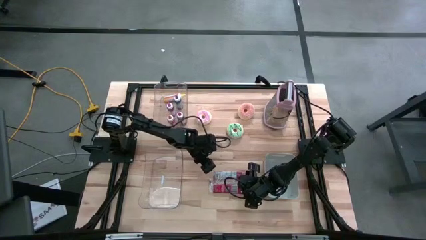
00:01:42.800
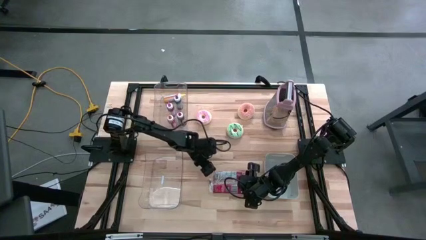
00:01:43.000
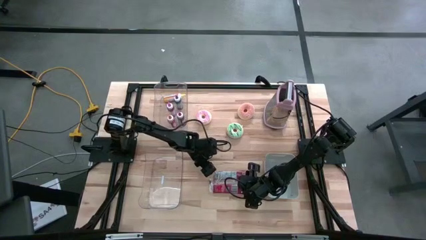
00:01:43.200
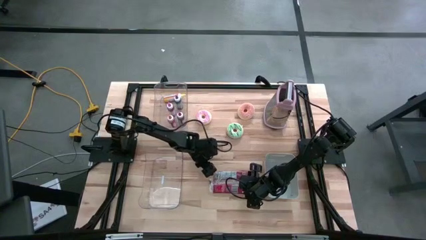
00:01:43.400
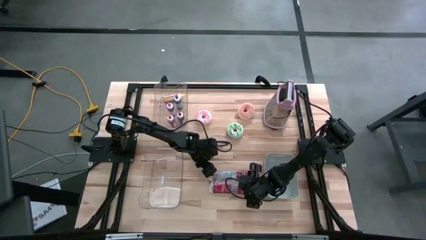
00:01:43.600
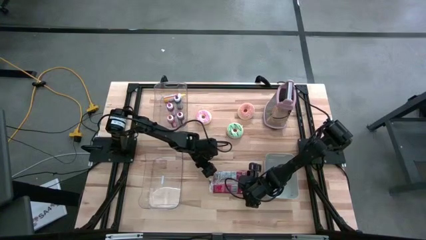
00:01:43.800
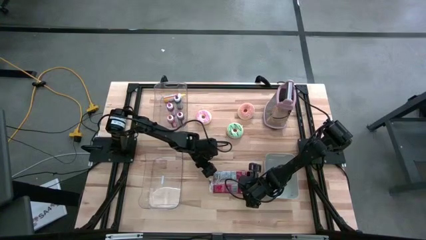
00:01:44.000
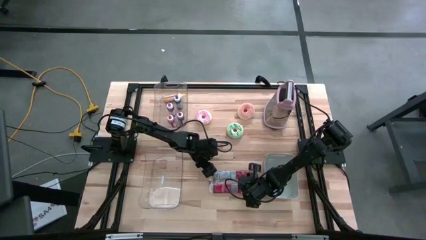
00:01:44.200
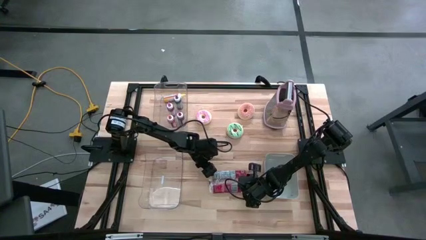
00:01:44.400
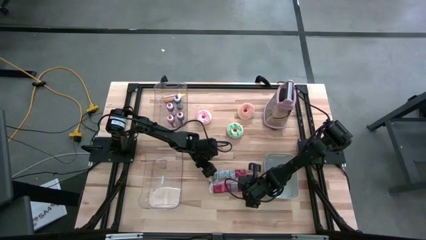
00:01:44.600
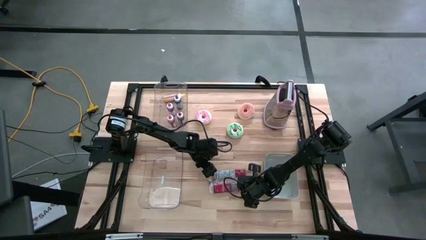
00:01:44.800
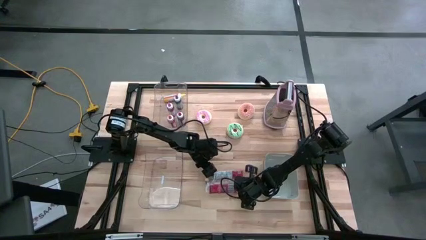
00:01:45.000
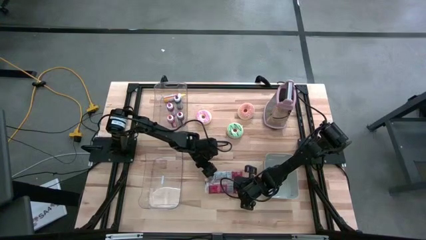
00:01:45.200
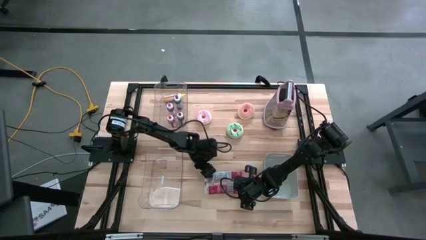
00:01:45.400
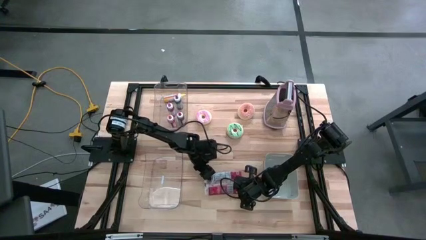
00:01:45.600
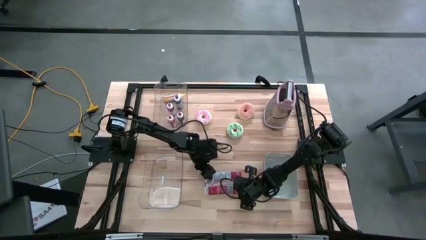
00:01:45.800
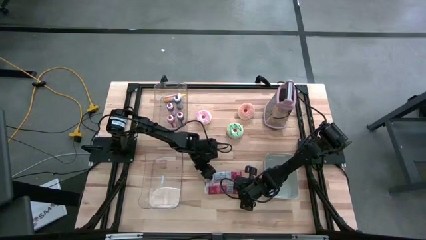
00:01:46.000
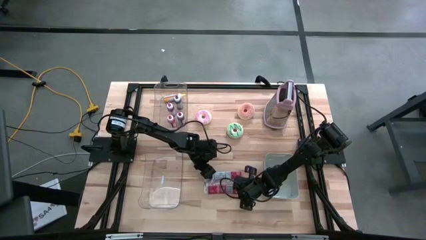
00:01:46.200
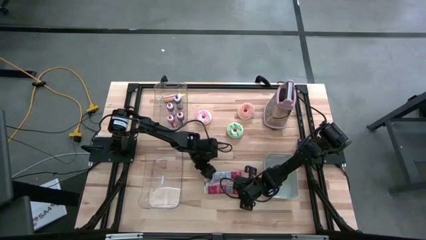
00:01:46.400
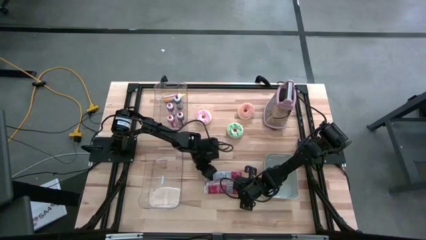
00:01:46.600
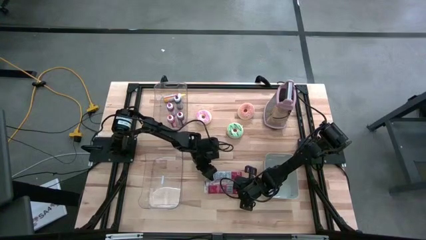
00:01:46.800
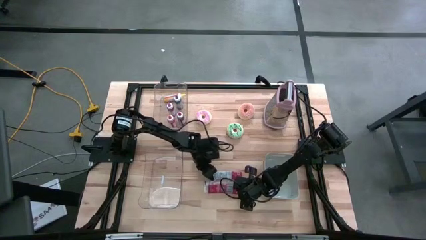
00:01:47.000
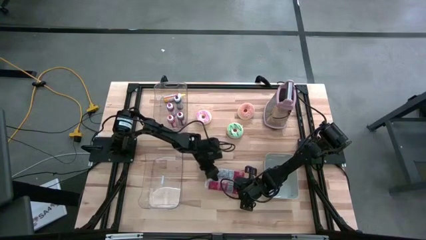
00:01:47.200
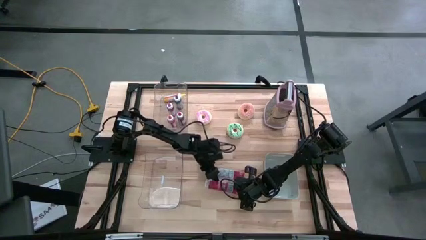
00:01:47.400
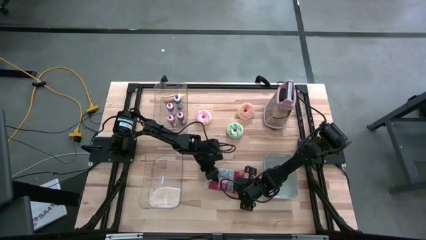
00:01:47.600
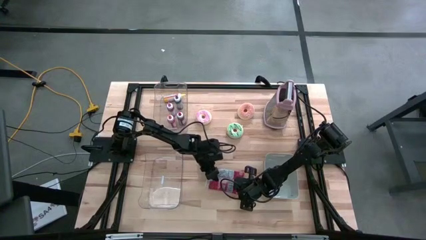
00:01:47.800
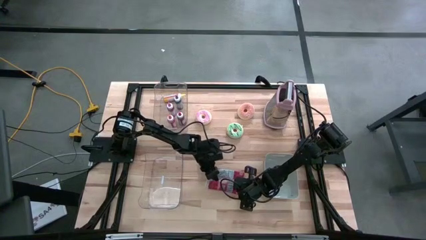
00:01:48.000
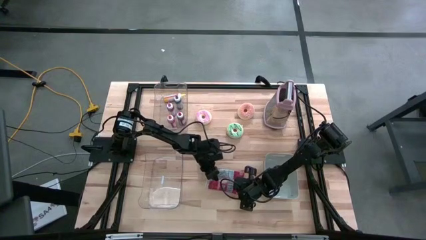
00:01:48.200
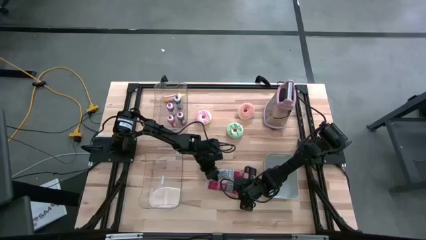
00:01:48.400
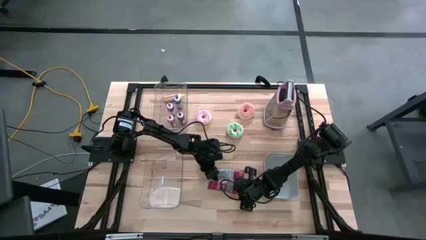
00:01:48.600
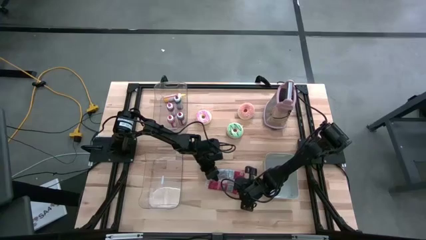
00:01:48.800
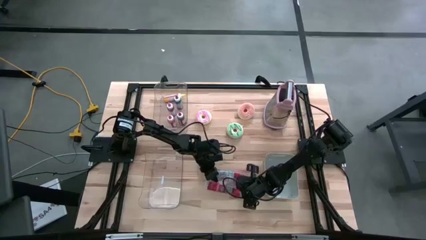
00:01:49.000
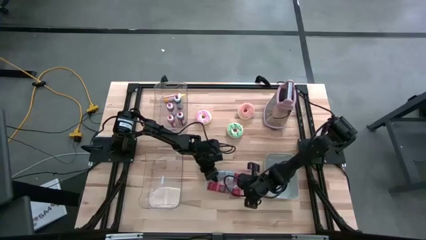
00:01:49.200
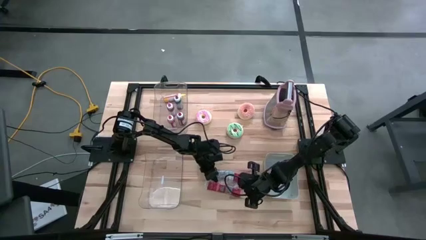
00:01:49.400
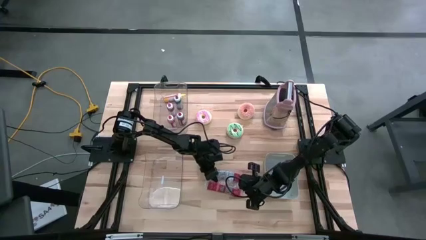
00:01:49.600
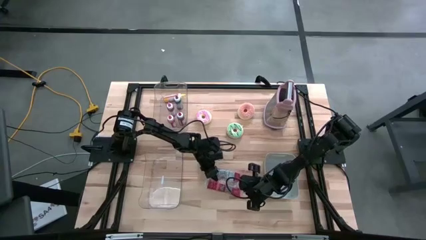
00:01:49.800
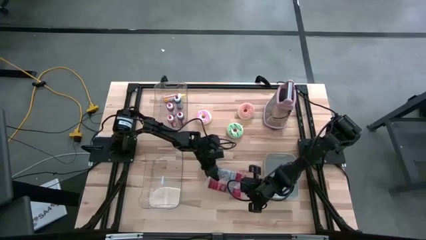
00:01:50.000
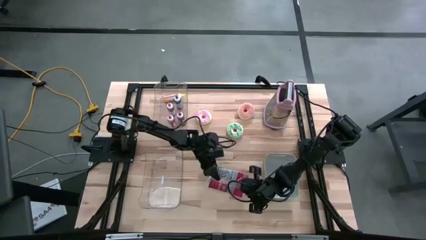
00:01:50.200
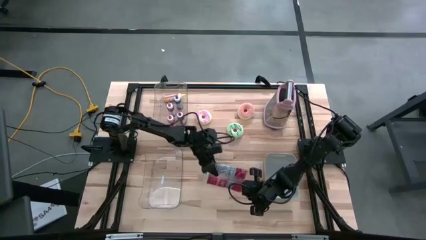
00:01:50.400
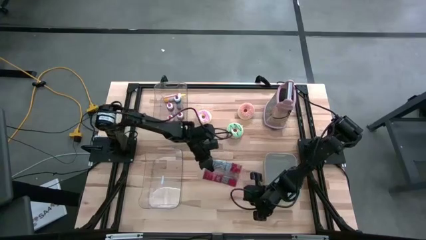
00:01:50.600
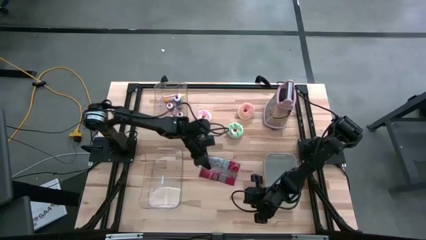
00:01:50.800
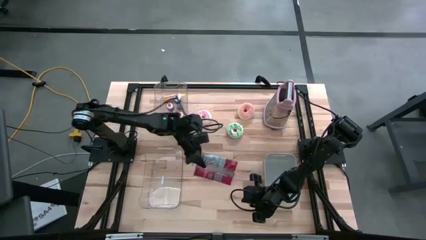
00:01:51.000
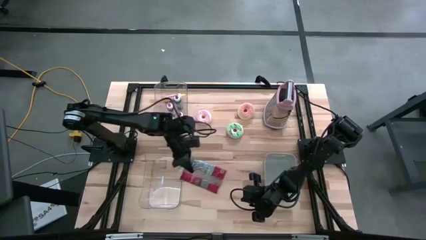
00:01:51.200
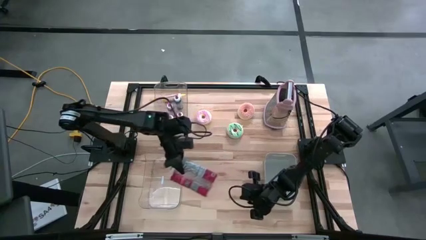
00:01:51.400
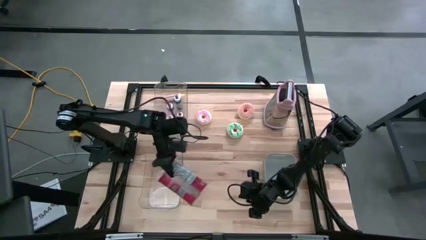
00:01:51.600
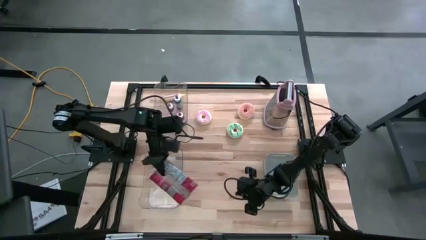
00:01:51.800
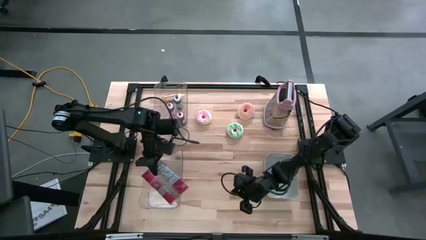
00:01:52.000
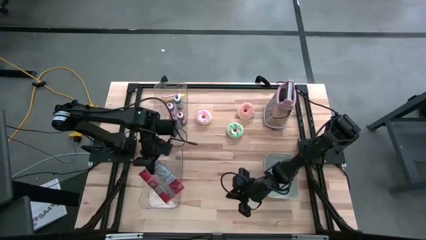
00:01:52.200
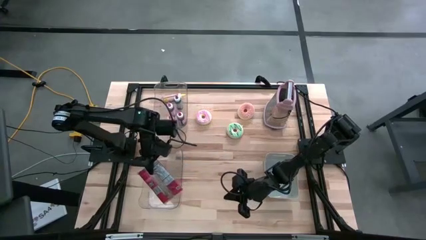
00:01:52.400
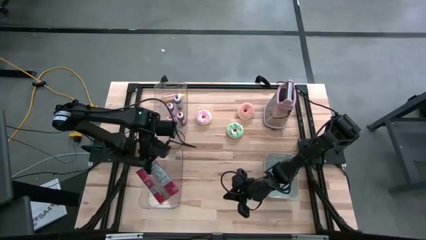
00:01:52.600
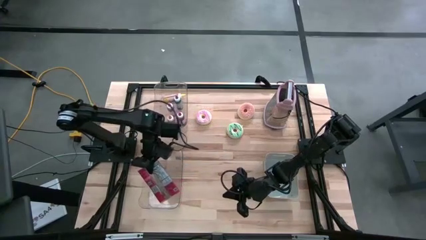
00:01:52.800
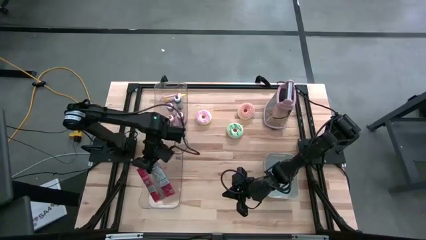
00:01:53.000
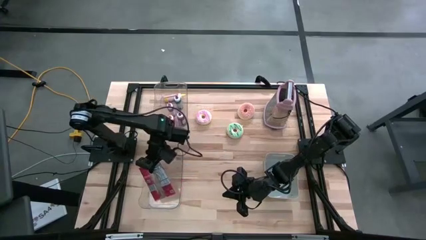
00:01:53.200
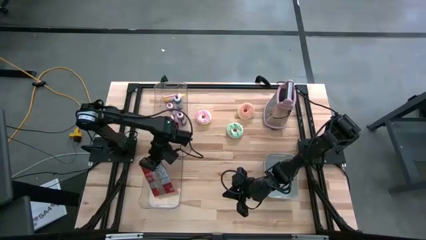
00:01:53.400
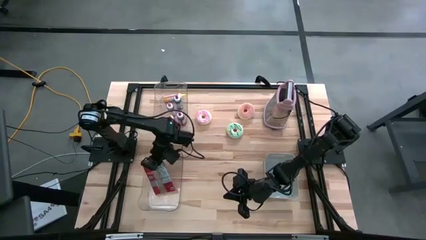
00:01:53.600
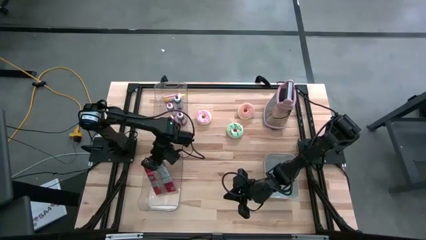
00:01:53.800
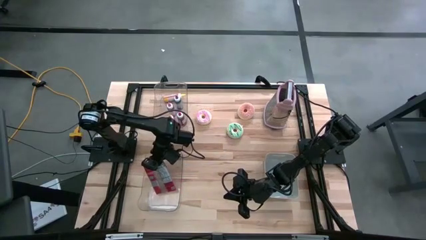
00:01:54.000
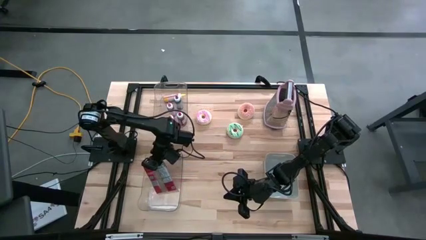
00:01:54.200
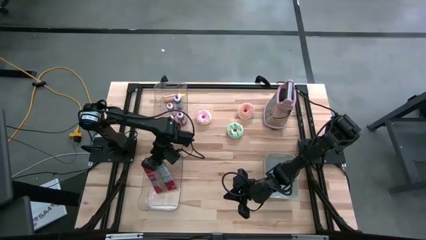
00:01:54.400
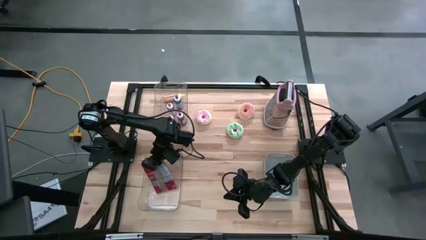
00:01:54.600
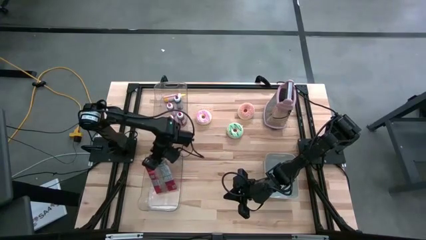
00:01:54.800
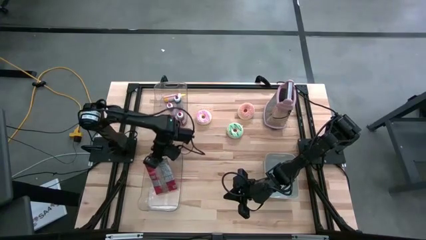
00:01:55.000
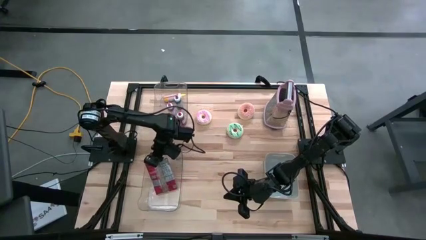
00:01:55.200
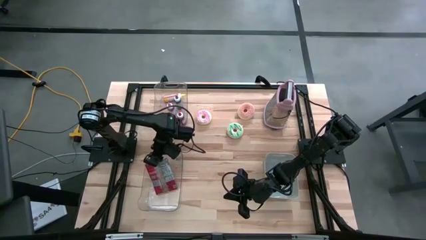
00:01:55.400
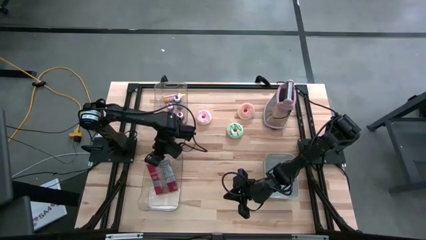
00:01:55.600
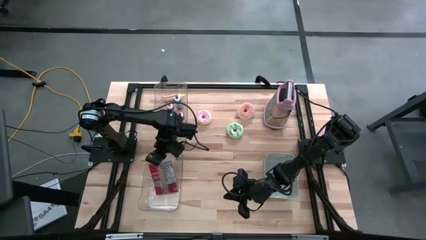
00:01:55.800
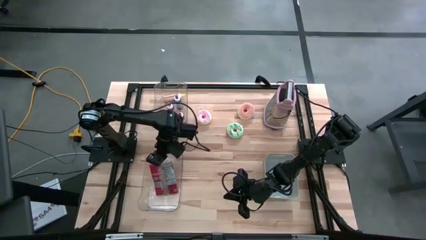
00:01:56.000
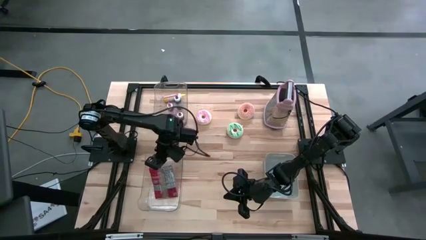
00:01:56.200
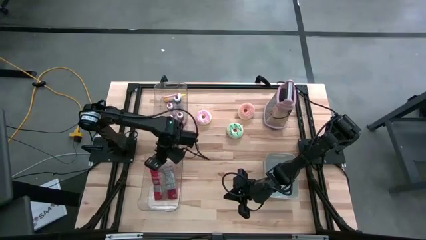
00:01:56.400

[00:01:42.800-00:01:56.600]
Put the red popcorn bag into the bottom transparent bin
